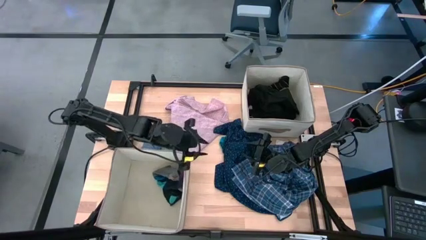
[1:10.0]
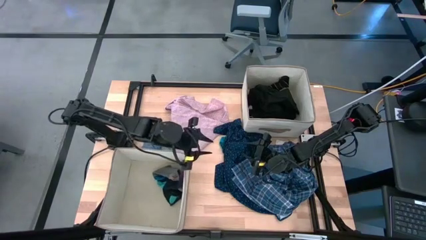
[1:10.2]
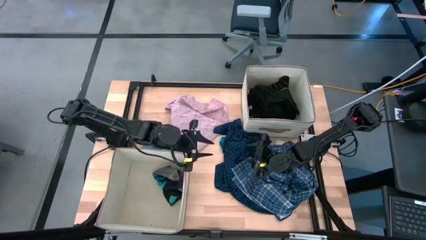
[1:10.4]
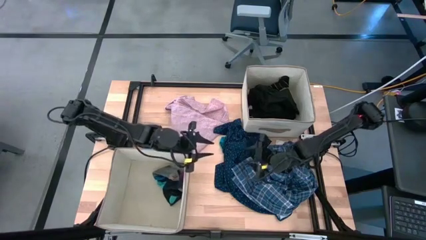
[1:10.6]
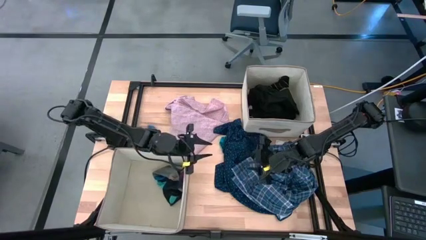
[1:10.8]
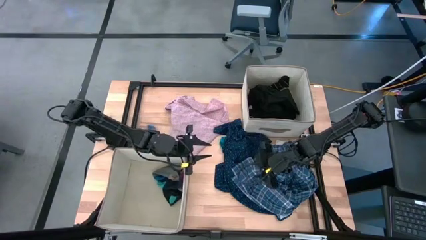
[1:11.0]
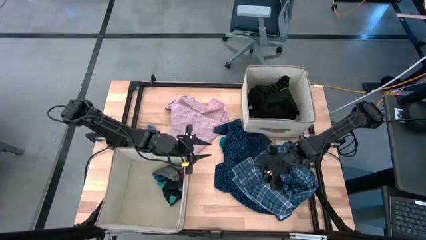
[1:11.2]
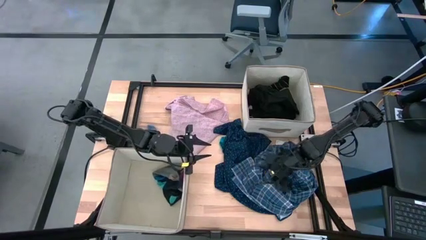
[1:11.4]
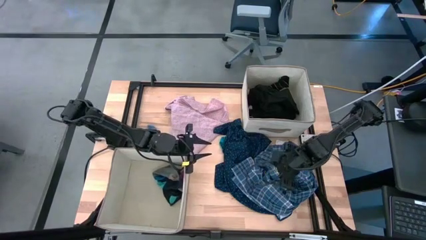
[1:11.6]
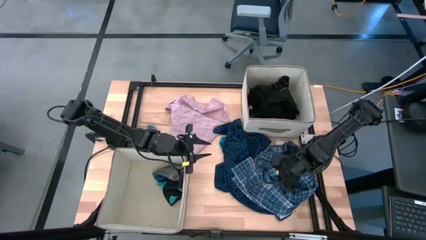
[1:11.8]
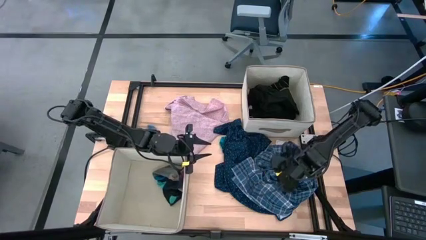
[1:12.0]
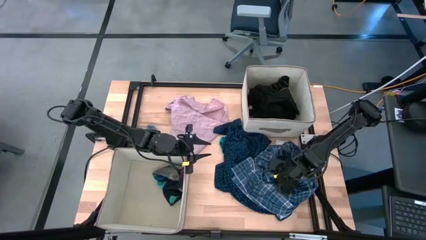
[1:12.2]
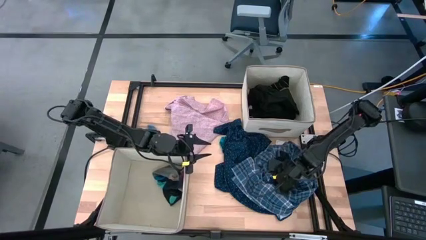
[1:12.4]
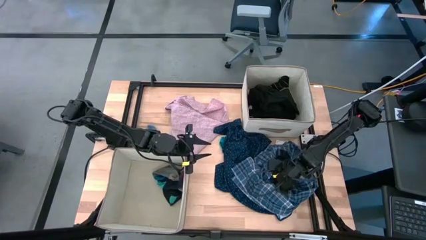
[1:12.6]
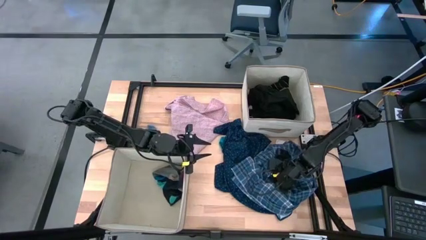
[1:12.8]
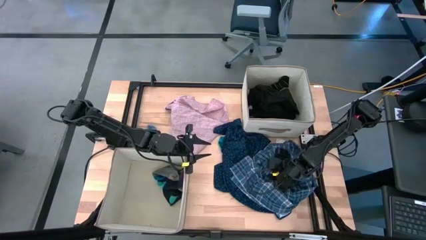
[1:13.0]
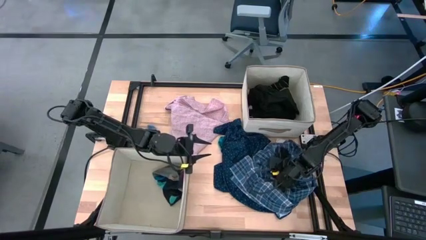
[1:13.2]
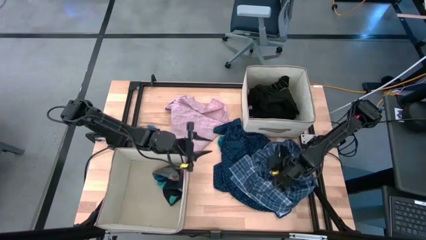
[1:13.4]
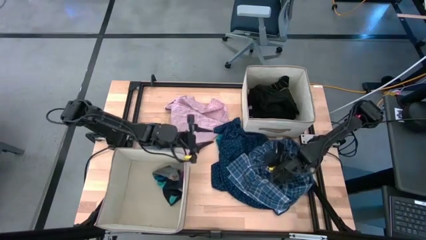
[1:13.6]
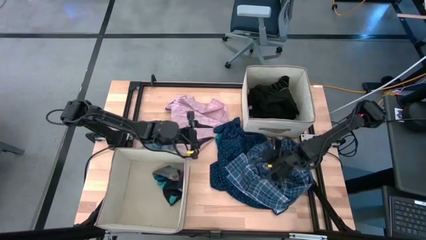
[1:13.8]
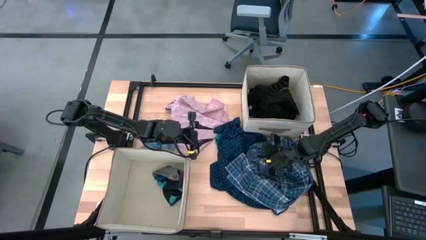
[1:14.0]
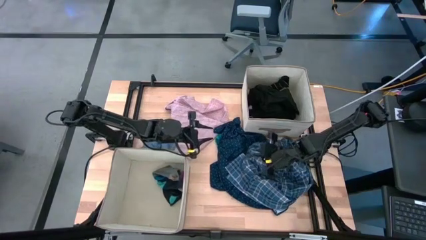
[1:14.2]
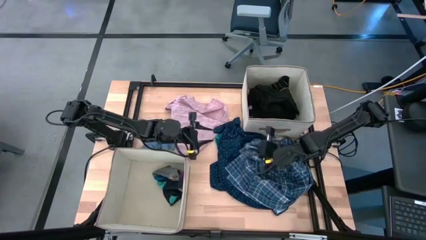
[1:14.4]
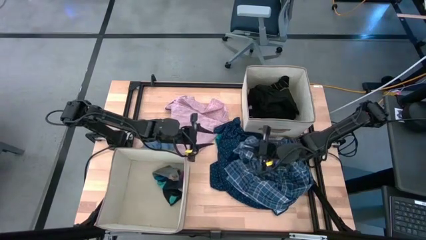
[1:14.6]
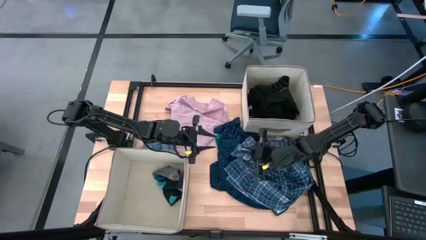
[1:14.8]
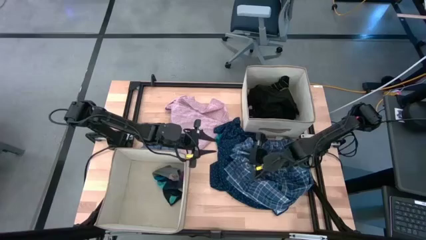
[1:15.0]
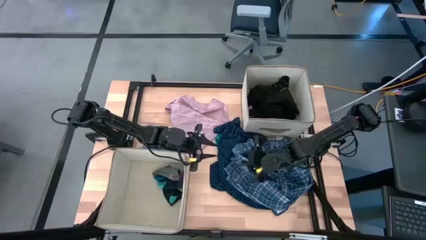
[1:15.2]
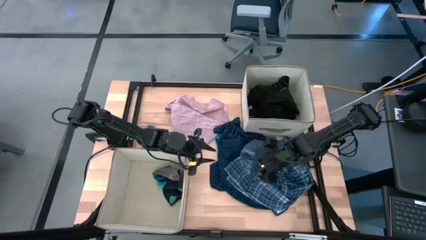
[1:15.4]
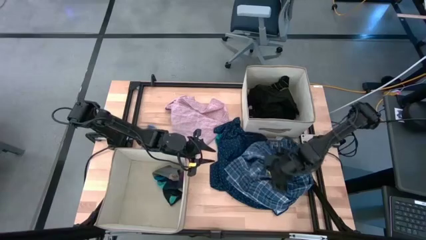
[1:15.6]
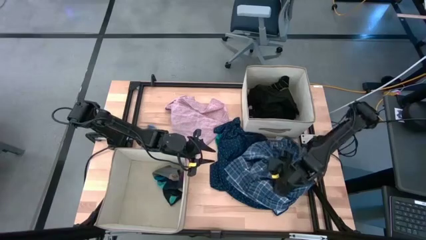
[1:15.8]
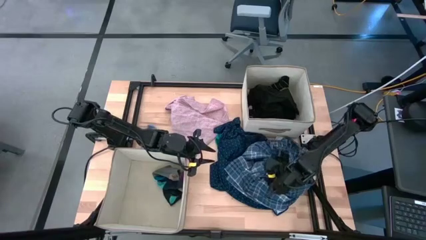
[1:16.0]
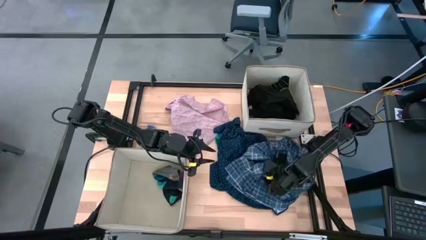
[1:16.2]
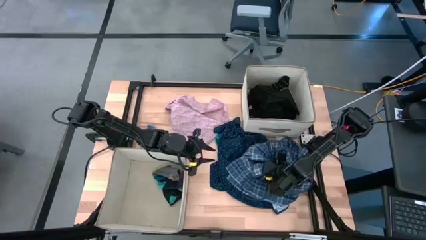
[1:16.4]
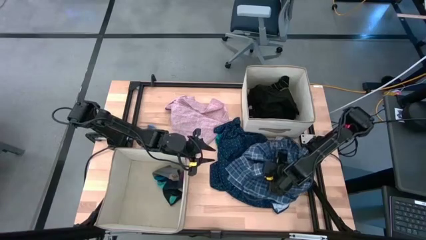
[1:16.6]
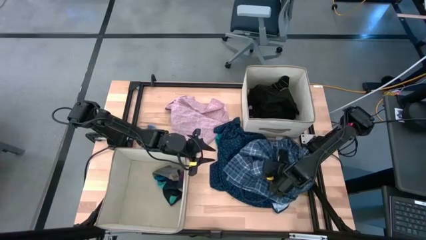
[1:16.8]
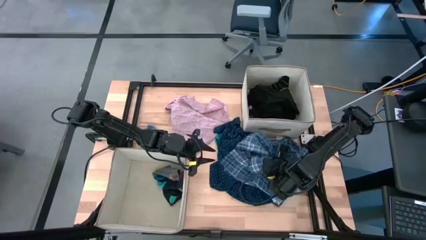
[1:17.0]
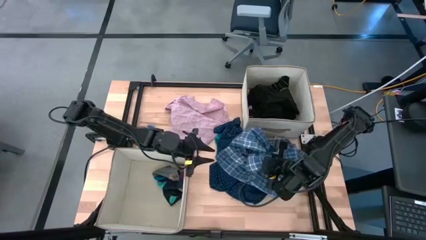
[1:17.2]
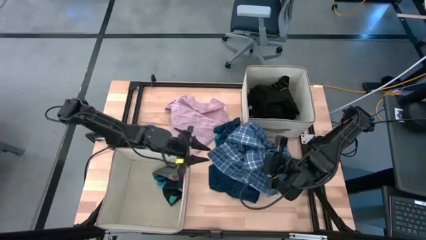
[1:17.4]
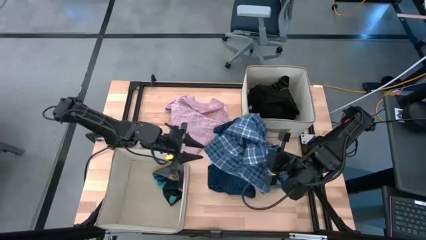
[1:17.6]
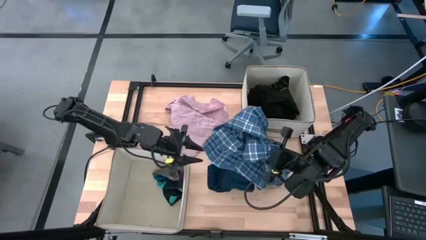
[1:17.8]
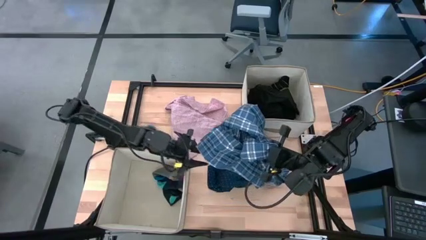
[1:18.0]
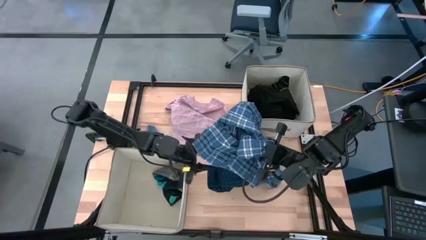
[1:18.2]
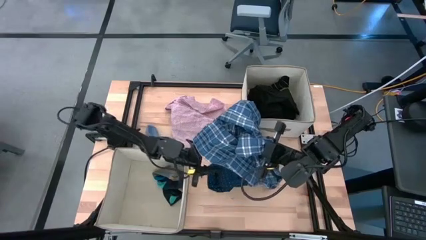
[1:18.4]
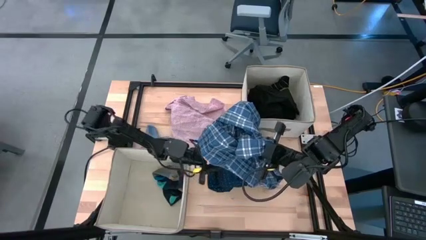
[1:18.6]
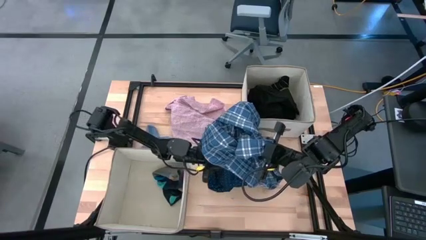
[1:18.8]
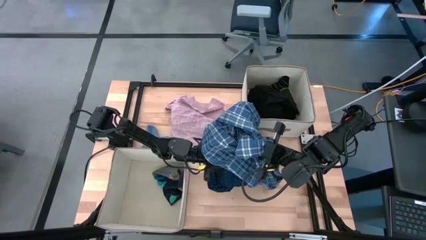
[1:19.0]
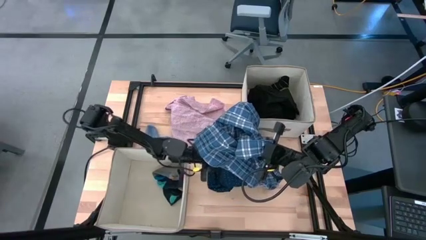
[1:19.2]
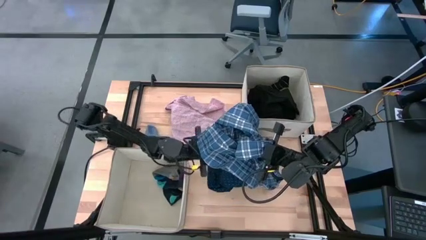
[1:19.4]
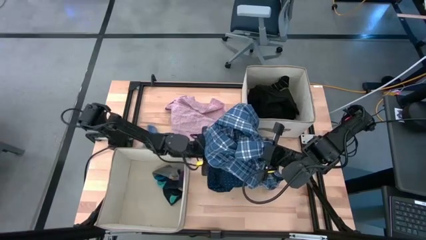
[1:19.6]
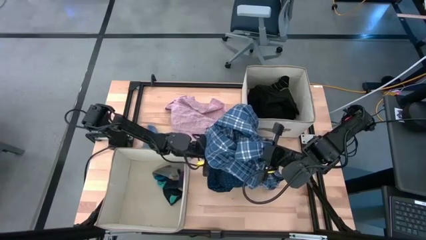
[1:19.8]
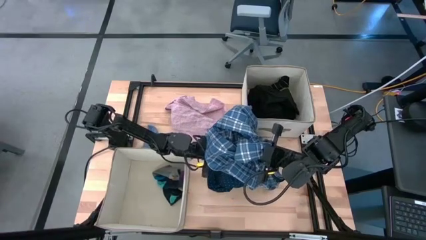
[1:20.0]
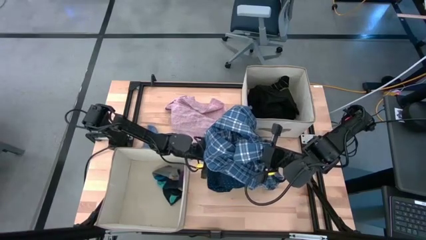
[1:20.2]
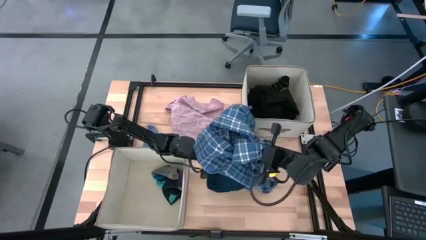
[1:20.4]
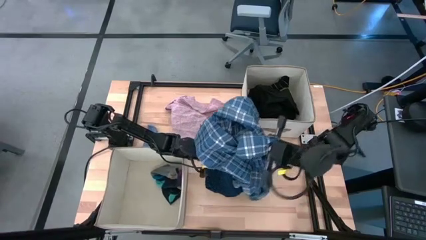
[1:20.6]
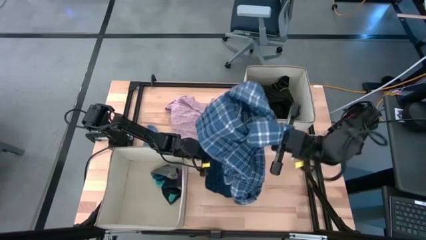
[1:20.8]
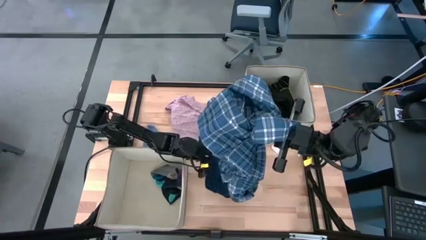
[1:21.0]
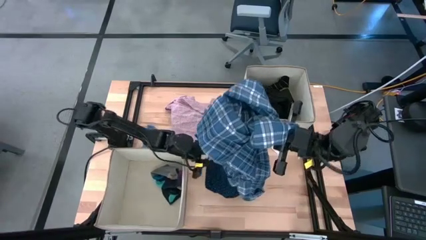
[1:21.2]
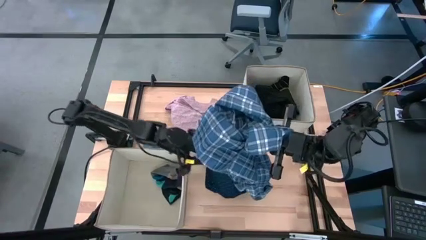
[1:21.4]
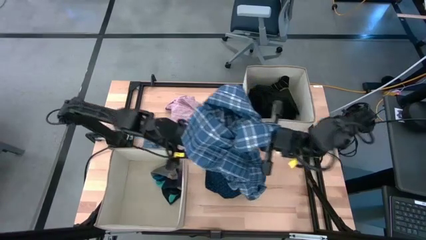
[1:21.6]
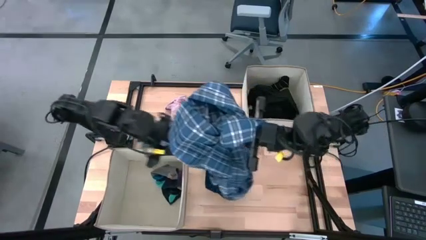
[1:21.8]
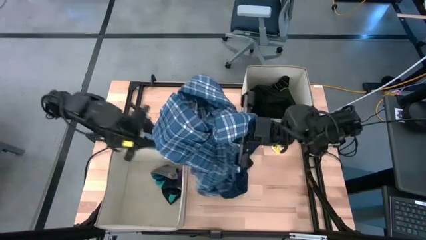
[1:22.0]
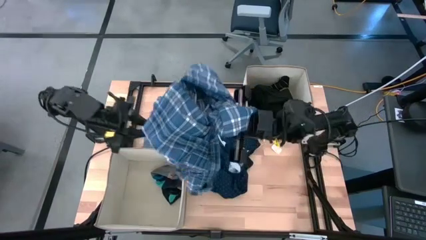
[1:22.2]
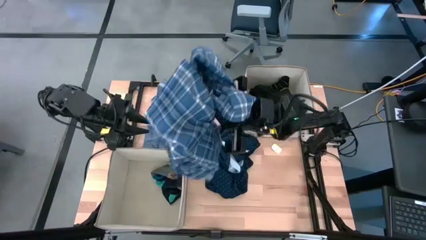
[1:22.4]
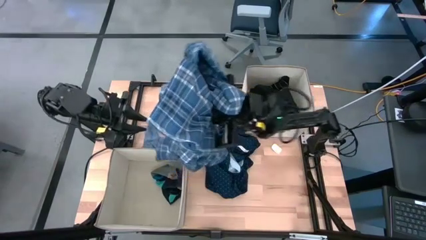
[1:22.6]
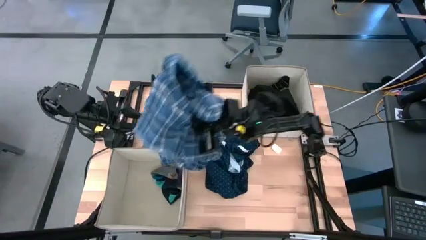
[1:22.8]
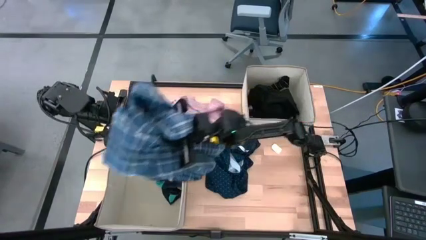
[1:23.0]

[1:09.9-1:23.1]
Task: Sort clothes
Put the blue checkered shirt into the bottom white laundry organizer

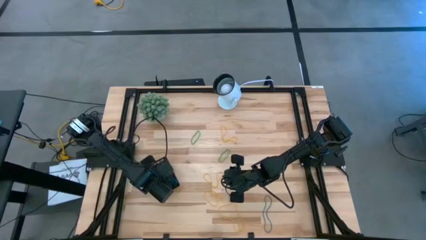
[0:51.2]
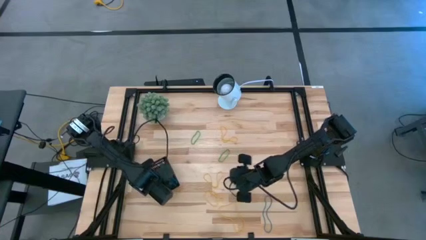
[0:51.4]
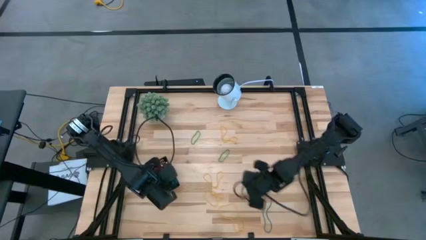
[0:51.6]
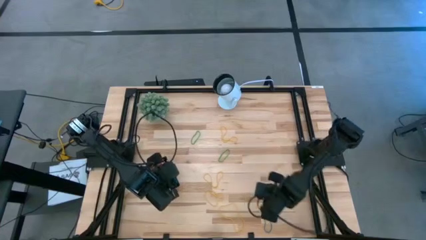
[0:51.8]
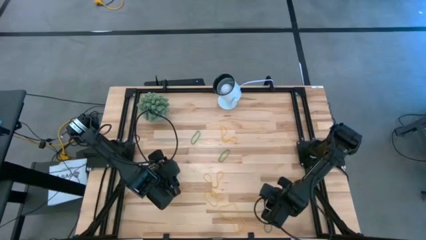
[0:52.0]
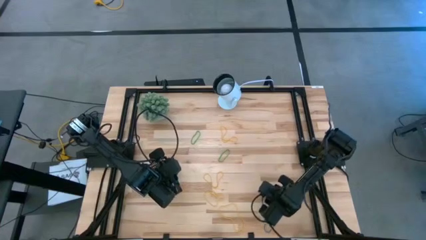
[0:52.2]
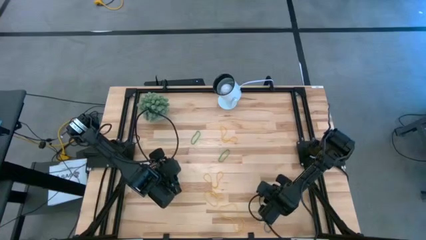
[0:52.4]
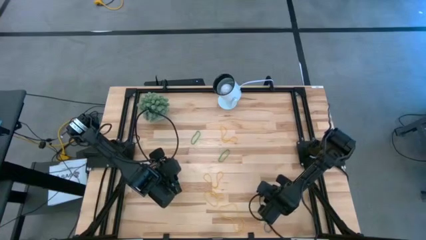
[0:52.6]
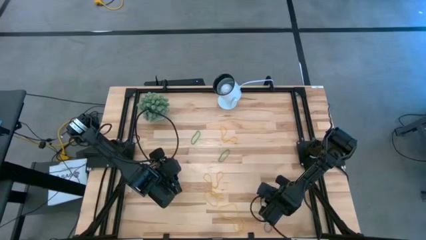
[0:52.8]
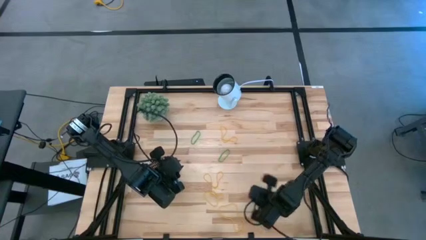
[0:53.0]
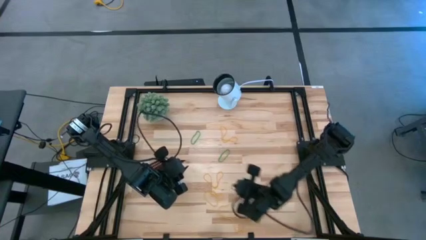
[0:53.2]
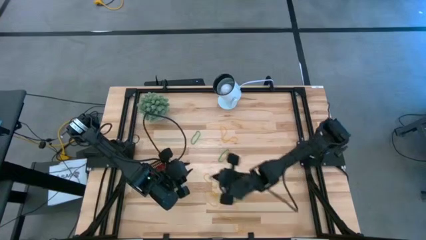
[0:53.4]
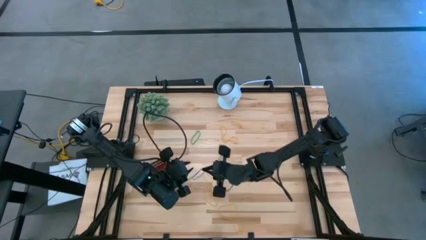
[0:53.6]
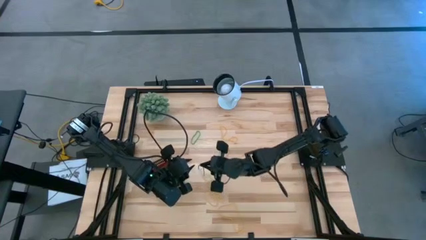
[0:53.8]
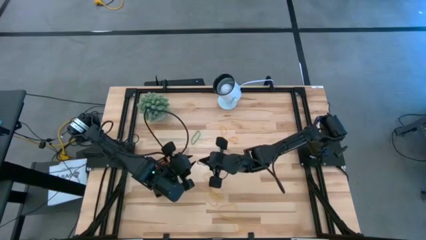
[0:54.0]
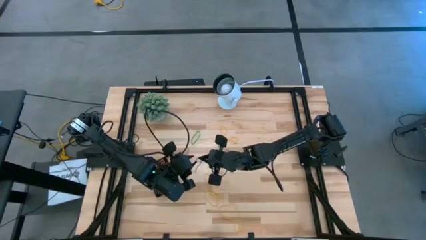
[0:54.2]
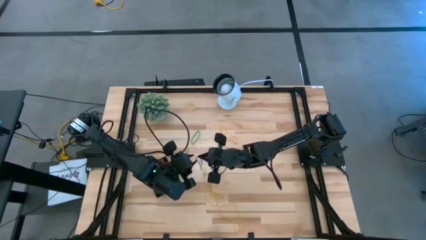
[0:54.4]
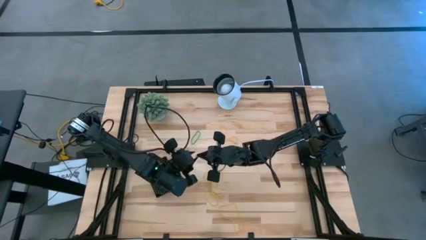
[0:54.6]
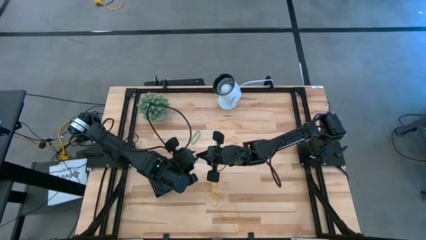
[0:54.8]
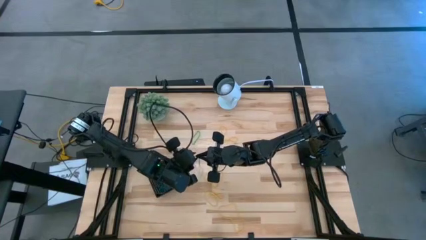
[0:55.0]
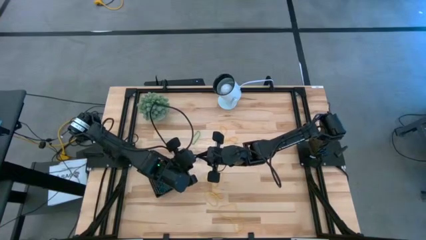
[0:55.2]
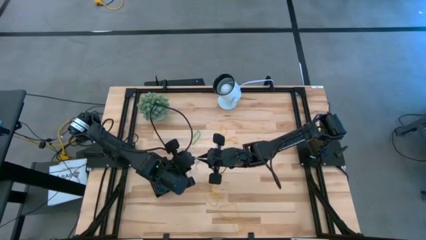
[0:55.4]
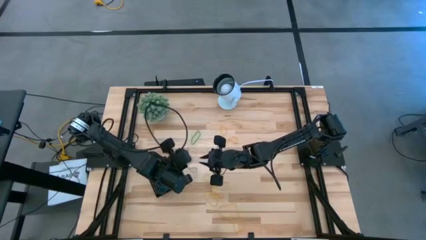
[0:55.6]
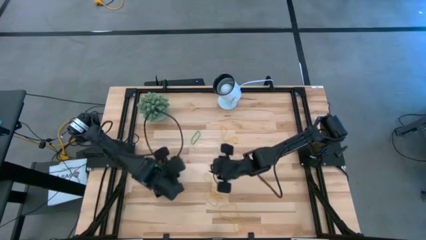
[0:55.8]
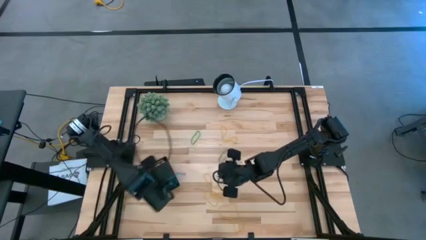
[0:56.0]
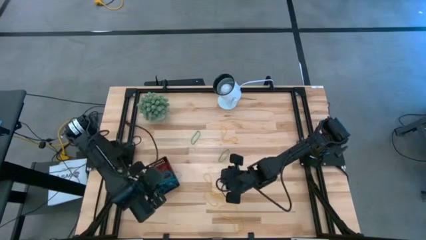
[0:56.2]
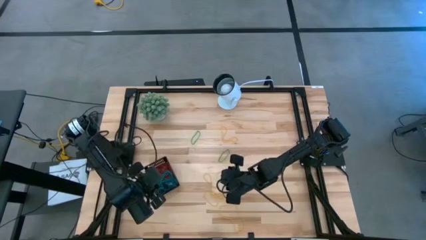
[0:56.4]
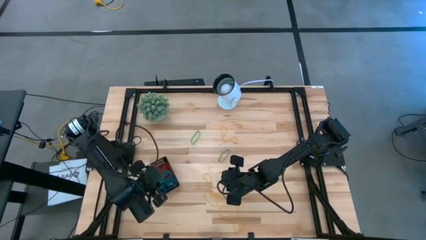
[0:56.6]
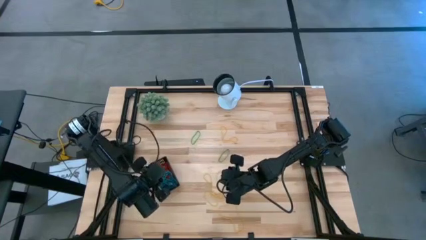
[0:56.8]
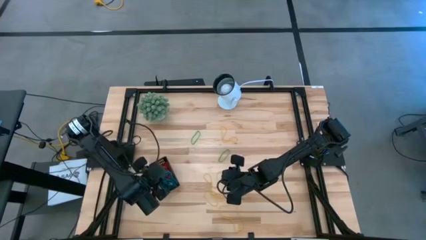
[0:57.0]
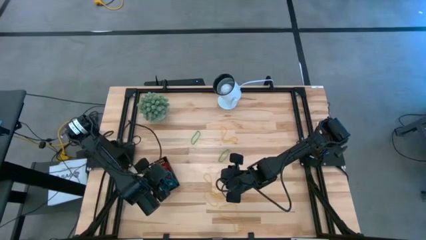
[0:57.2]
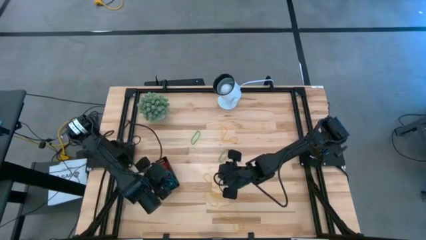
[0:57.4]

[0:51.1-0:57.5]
Task: Pick and place items into bin
Put the blue rubber band into the black bin
